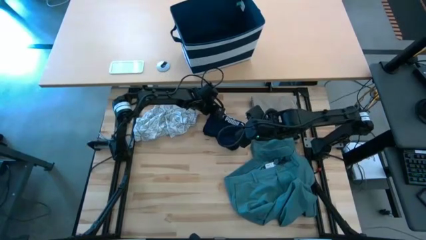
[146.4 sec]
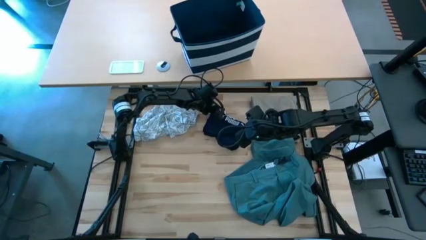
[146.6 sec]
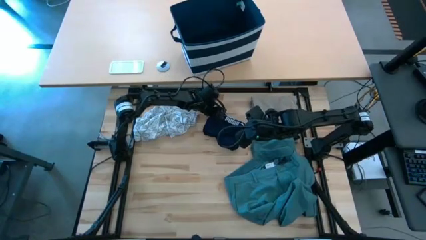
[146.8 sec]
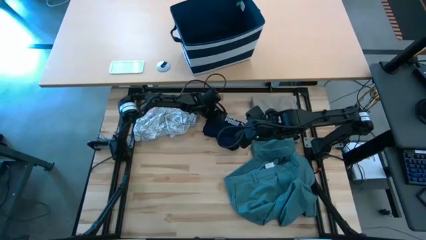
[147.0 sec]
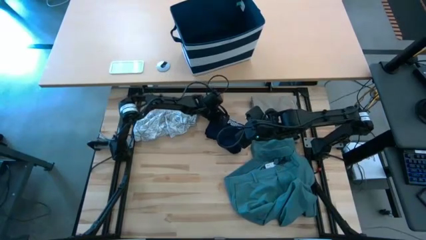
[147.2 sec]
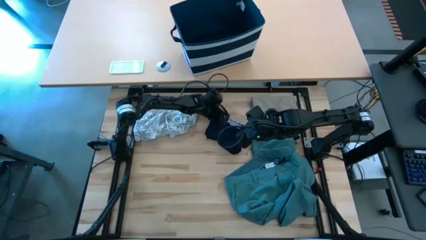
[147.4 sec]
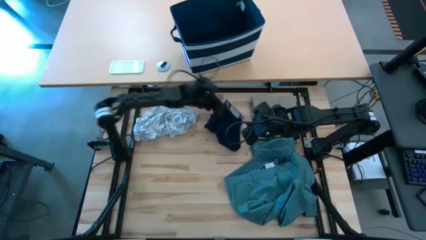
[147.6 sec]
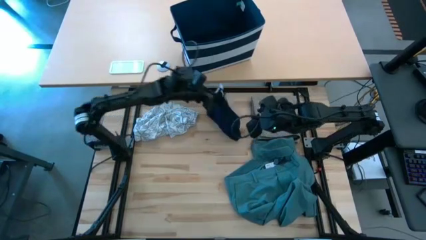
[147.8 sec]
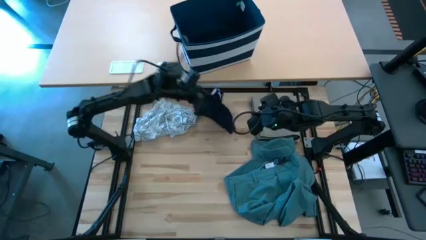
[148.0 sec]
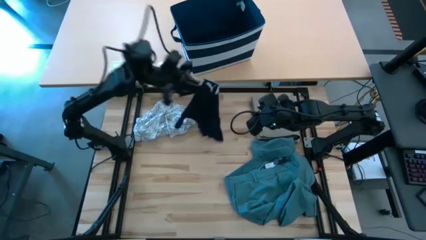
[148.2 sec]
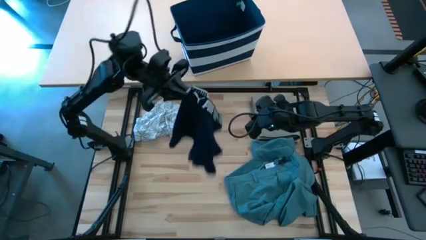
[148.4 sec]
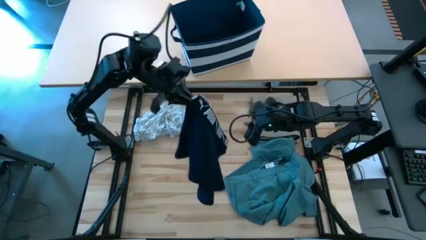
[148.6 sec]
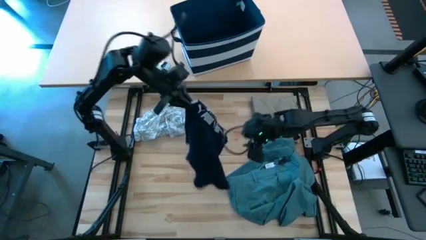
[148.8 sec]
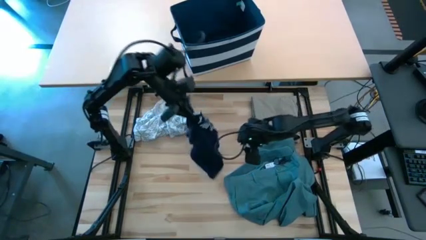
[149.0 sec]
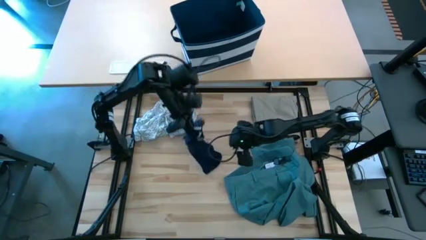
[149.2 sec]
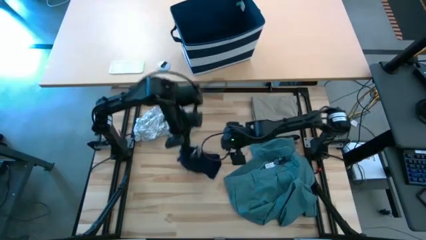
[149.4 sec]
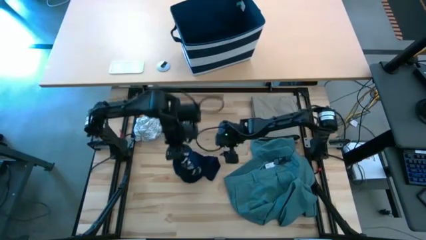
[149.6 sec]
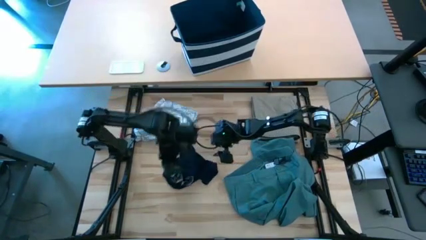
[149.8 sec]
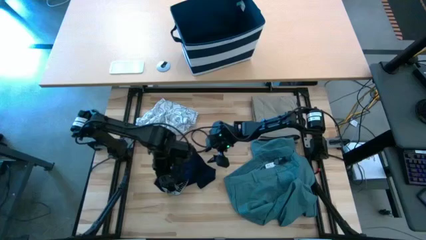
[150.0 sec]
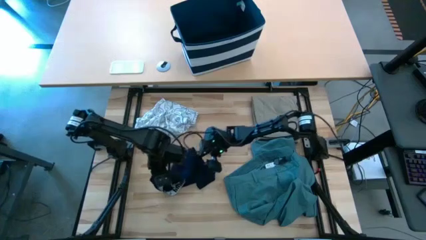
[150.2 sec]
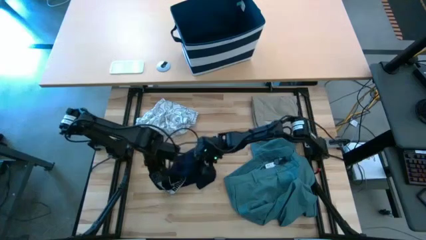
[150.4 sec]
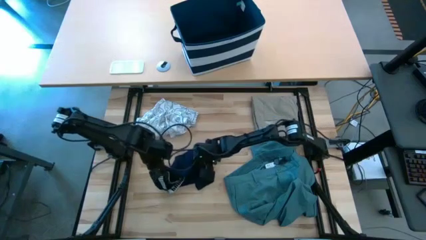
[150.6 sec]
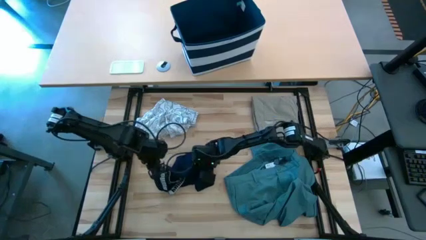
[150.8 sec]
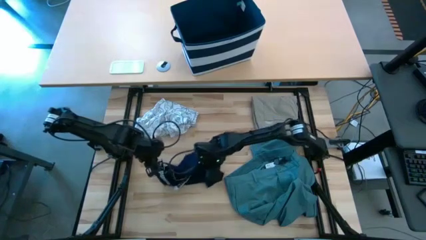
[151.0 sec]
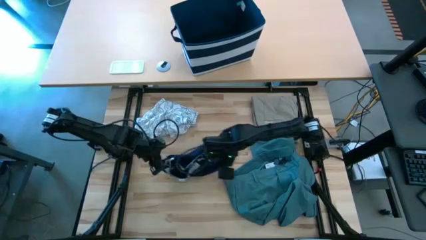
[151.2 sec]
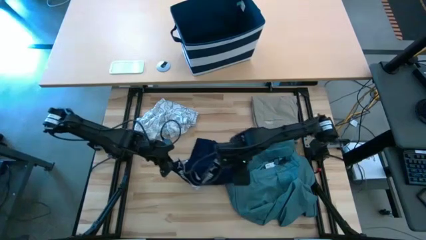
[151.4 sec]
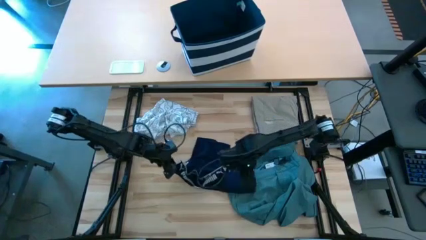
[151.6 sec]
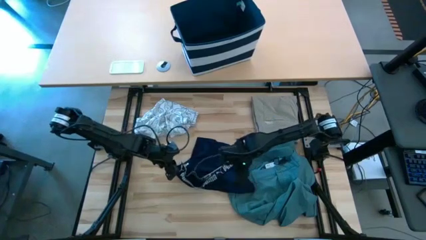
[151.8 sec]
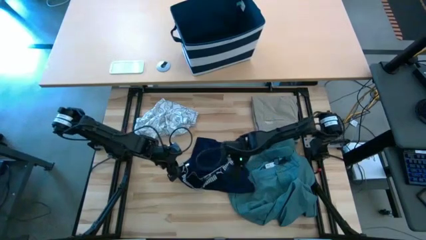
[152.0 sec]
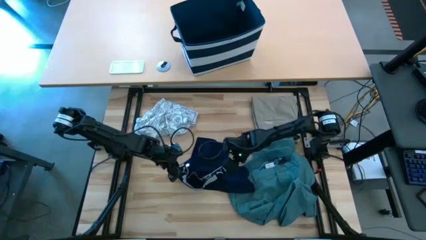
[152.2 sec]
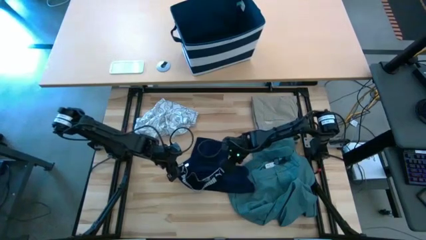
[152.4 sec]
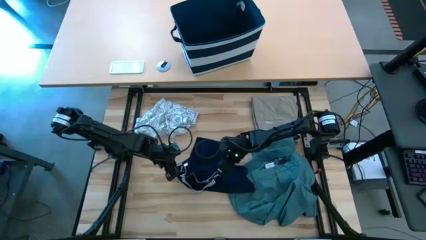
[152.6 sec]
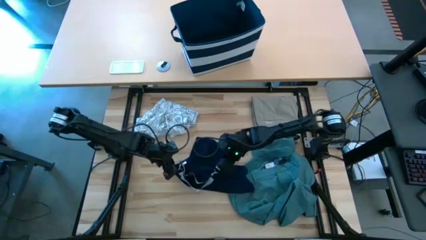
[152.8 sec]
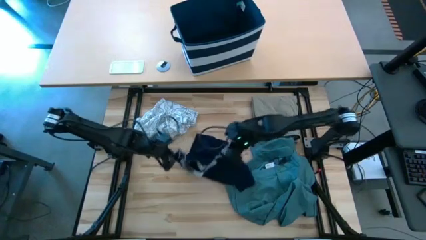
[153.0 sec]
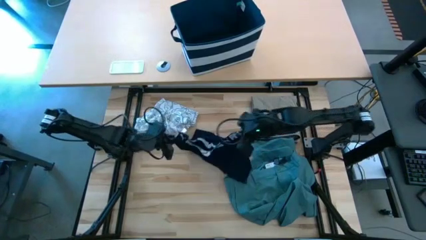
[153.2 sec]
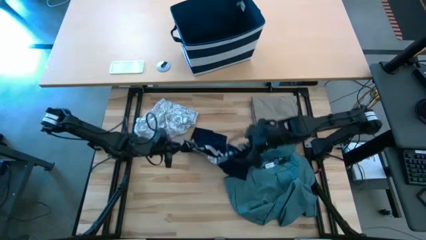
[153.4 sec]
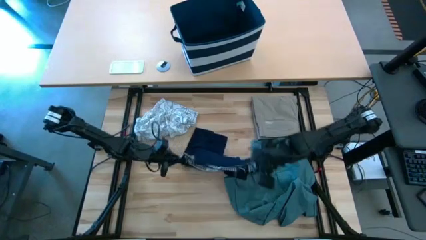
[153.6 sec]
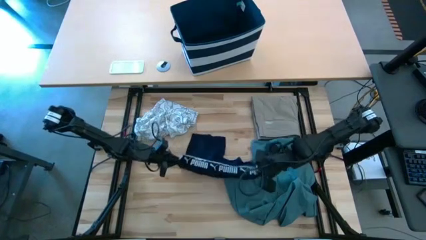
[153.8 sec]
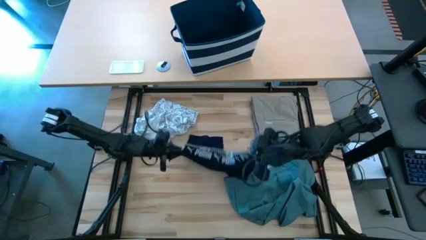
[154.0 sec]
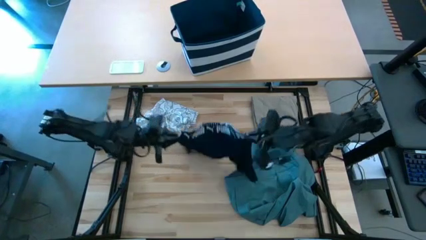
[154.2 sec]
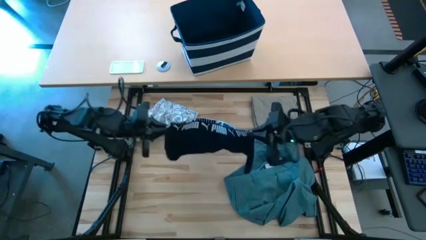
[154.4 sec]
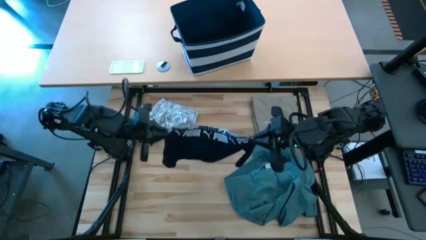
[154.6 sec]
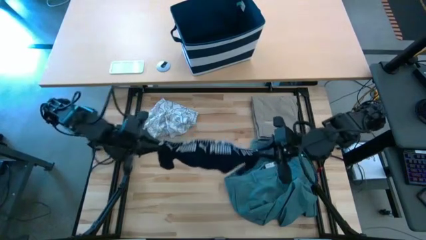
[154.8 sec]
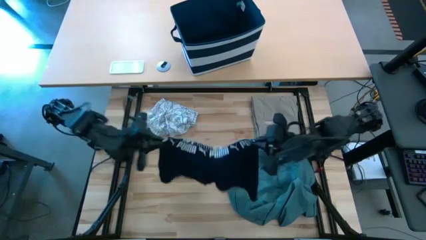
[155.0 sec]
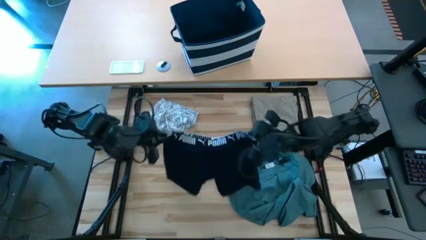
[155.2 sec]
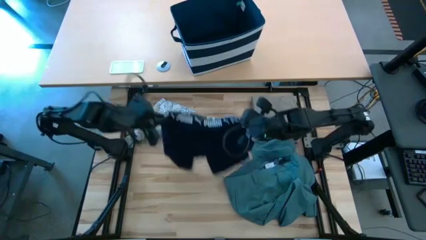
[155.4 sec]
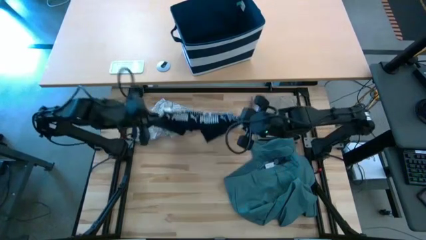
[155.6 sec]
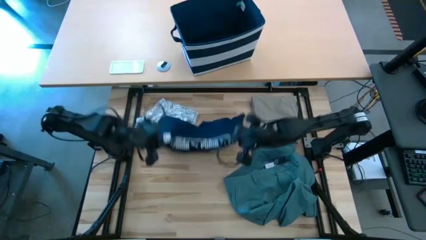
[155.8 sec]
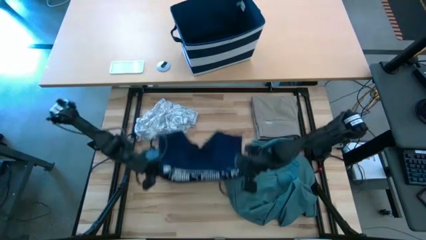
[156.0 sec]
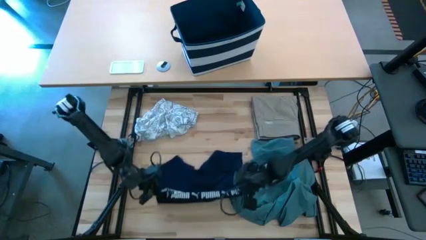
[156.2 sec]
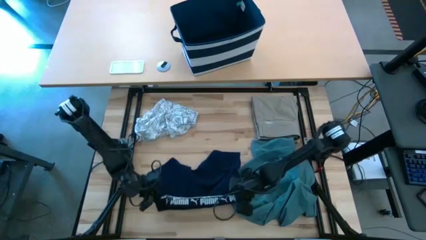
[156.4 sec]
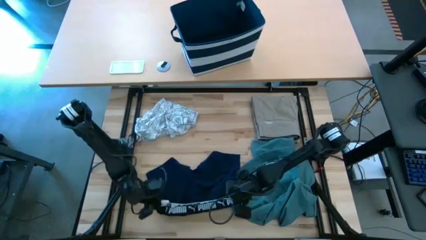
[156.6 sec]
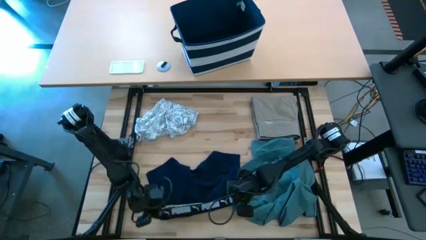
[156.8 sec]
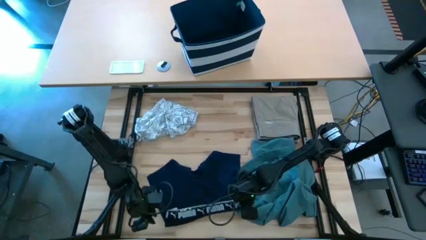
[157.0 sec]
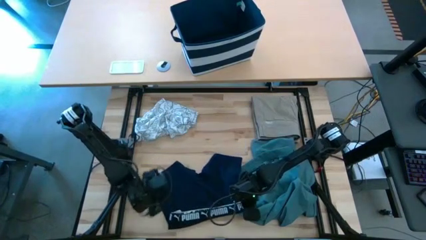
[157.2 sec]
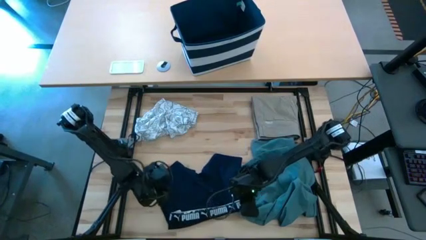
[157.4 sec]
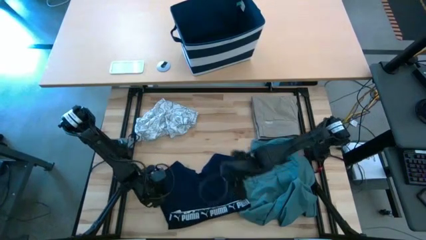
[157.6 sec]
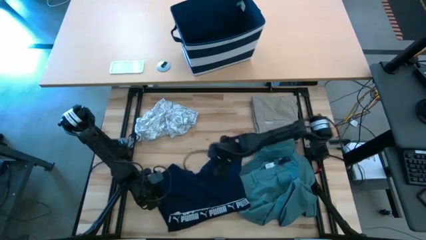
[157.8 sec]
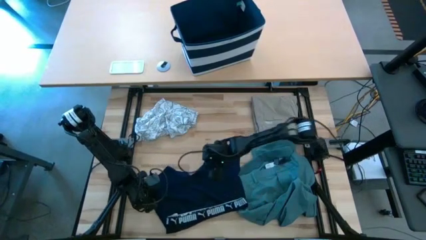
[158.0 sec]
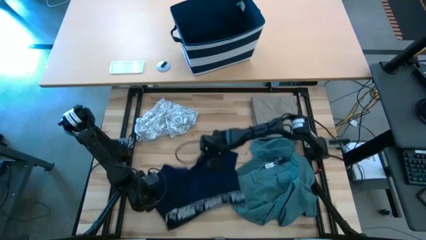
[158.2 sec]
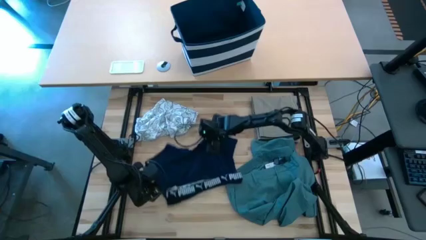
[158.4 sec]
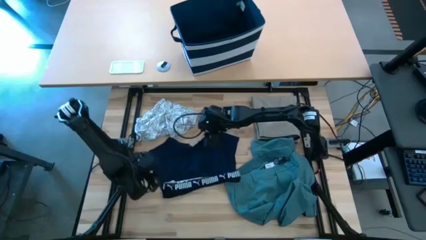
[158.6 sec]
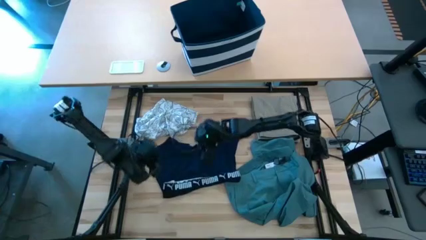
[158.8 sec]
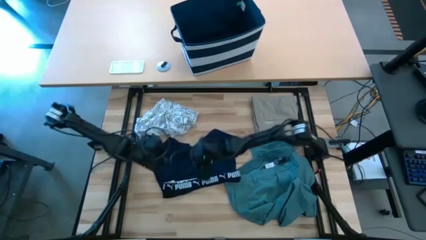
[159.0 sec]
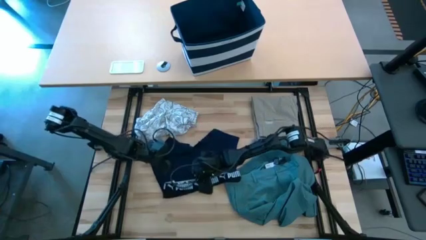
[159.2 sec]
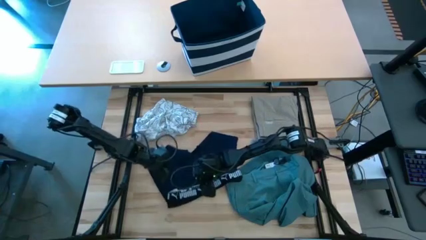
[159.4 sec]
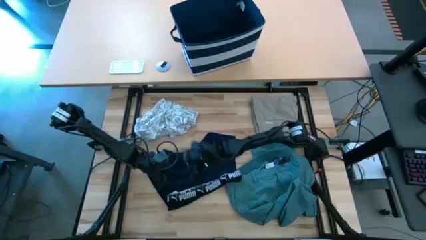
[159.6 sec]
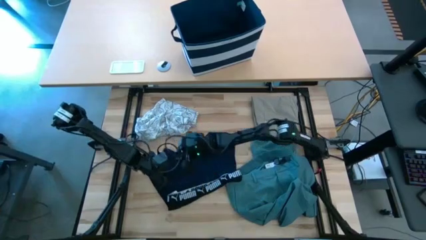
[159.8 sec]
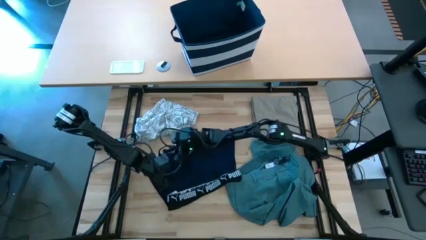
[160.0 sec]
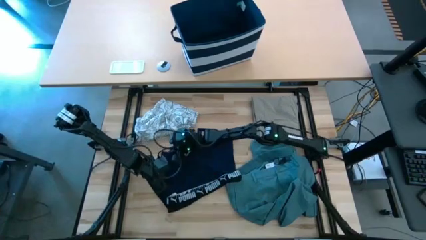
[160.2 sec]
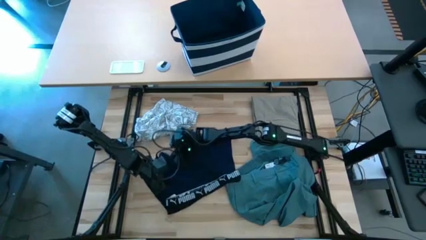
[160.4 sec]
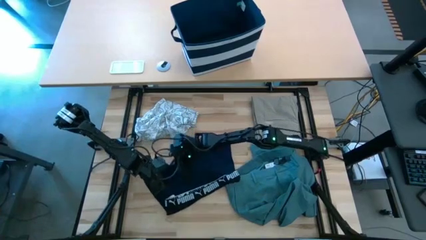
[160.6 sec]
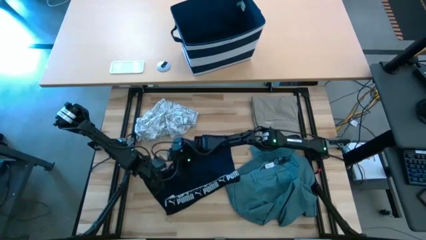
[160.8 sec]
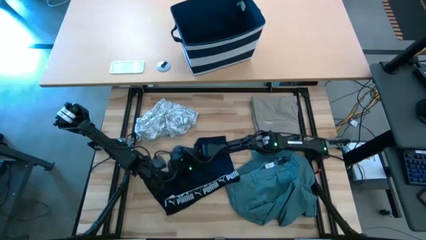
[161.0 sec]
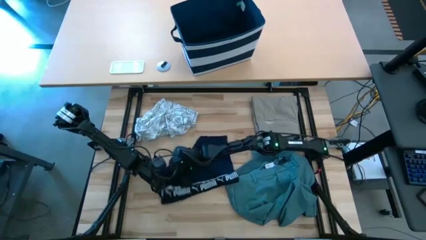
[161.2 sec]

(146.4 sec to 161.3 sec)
Task: Fold Laundry from Bin
Fold the blue boxer
